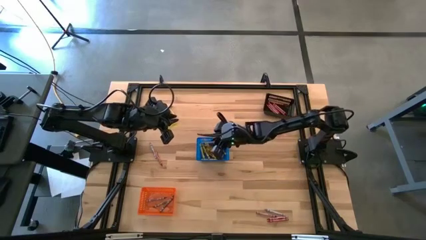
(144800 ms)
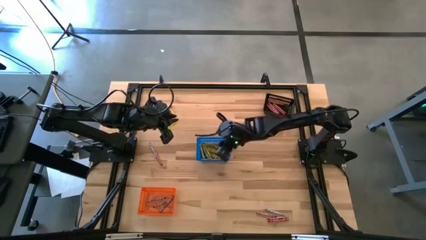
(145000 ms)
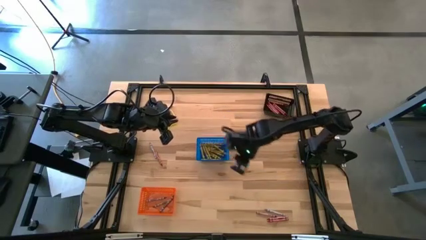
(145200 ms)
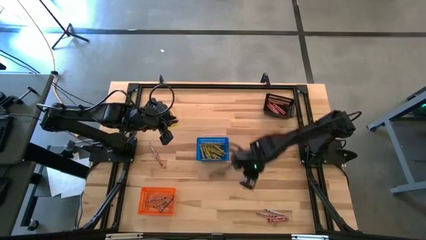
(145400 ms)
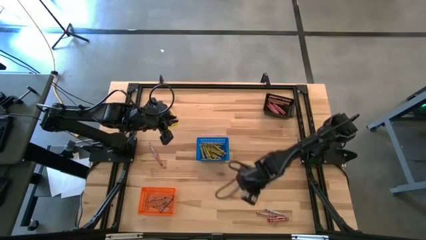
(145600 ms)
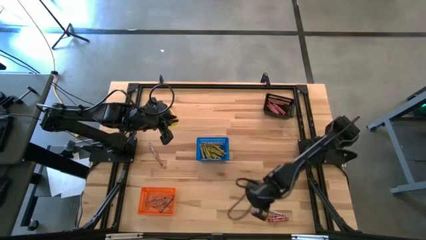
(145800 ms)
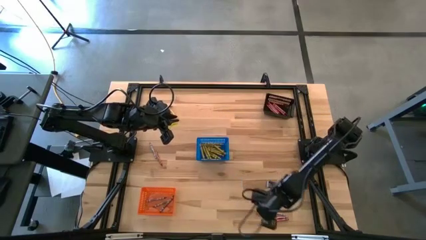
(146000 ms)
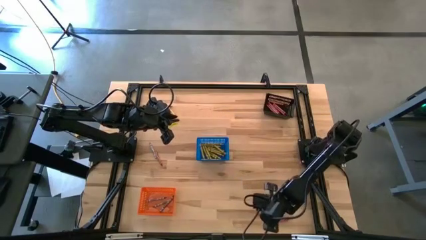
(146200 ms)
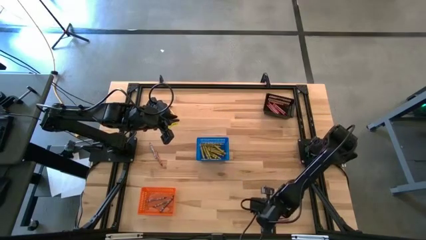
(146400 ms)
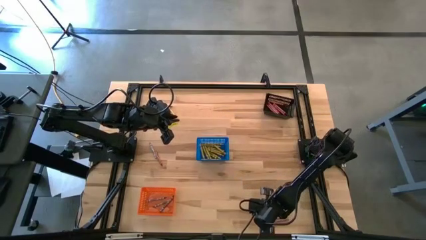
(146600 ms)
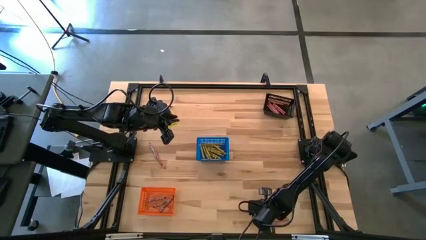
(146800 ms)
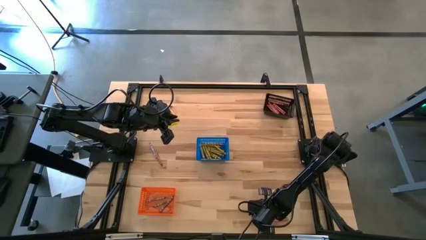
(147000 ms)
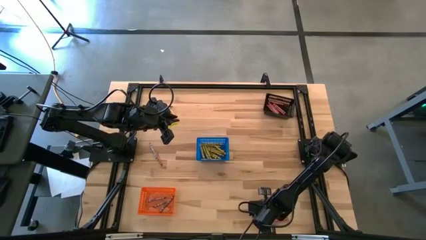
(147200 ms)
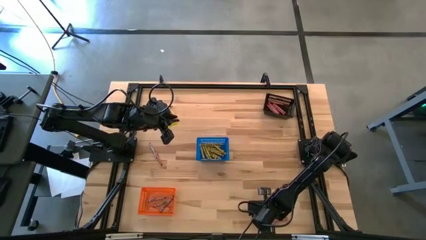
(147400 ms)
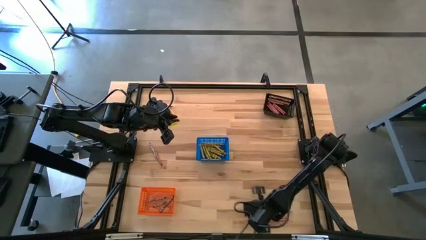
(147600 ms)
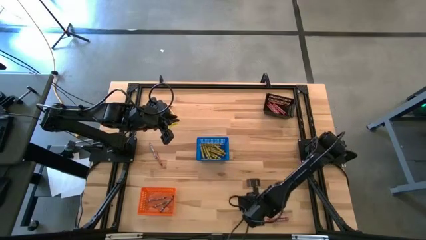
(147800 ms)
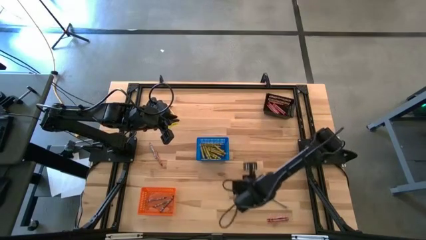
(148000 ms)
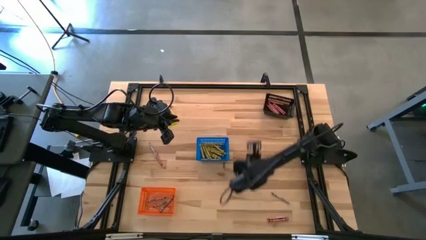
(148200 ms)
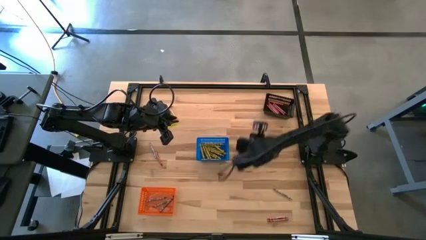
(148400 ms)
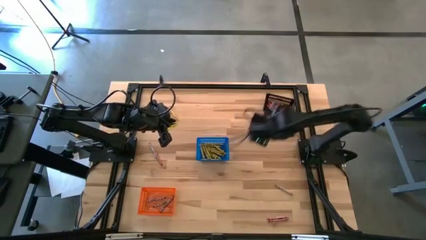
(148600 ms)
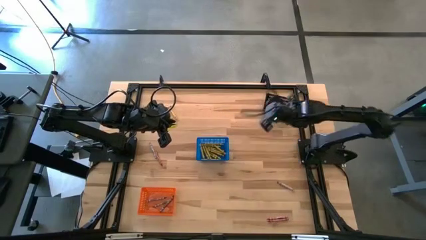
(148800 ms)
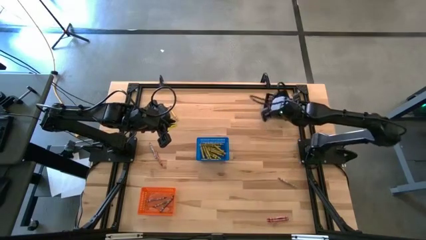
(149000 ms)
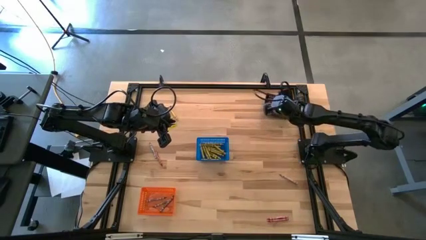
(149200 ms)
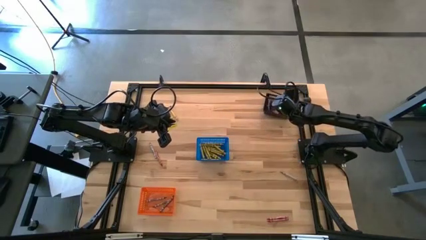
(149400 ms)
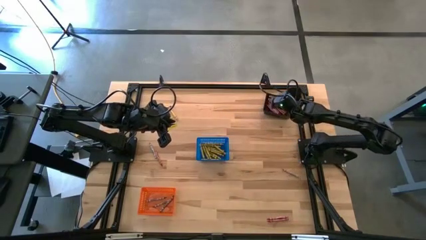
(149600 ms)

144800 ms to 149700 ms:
Task: Sort crayons
Put the red crayon into the black basket

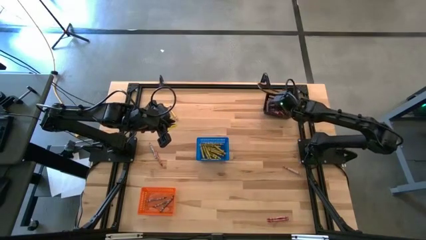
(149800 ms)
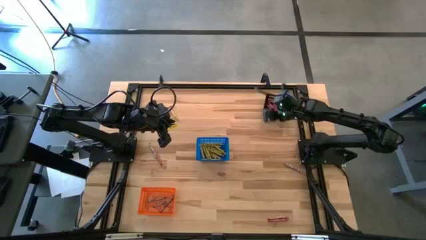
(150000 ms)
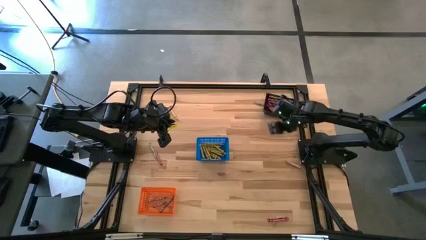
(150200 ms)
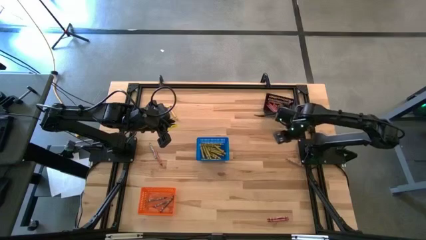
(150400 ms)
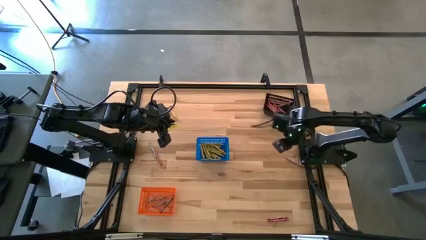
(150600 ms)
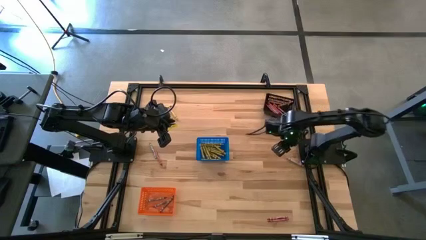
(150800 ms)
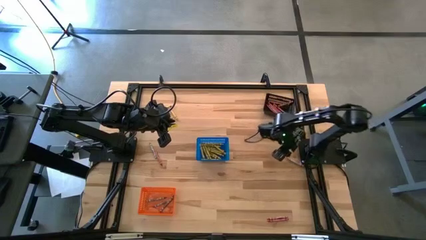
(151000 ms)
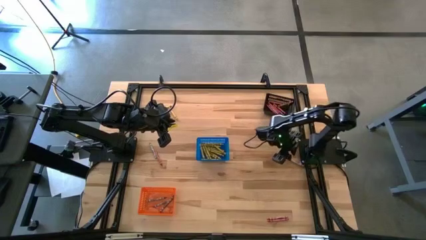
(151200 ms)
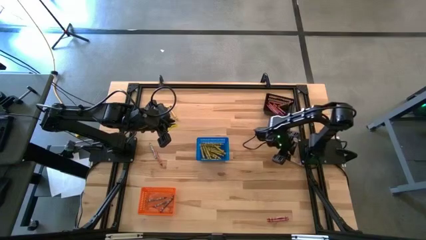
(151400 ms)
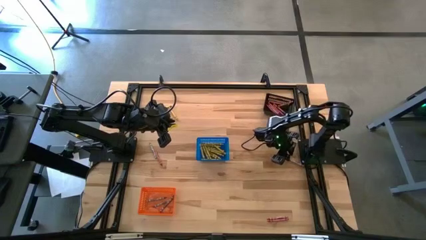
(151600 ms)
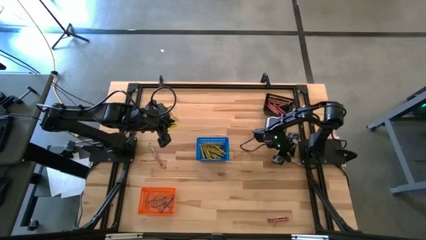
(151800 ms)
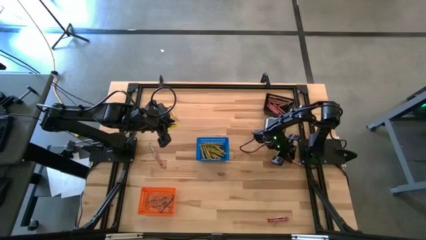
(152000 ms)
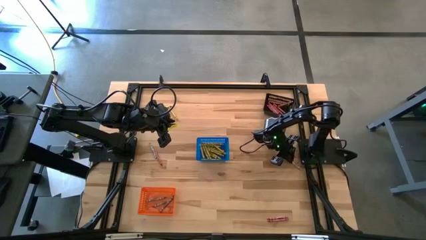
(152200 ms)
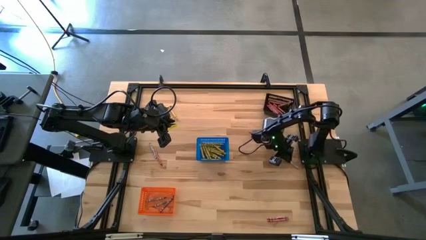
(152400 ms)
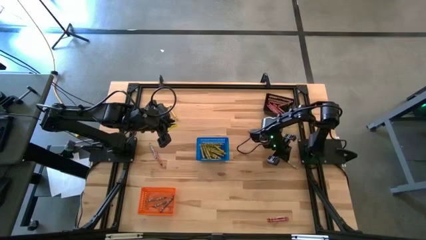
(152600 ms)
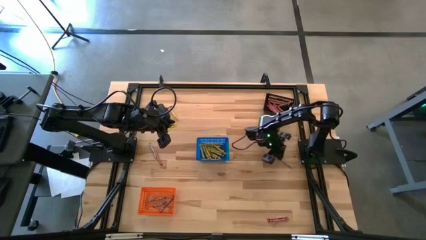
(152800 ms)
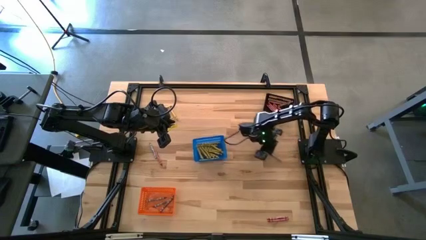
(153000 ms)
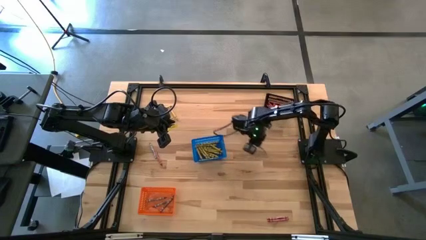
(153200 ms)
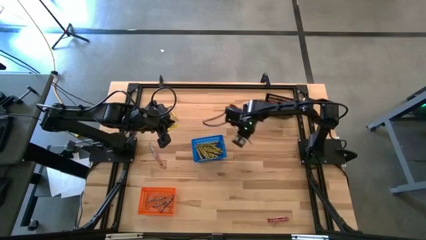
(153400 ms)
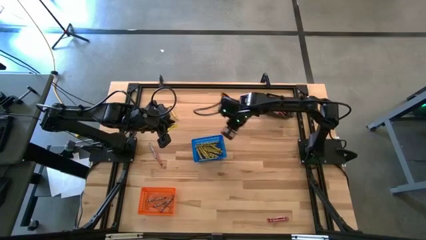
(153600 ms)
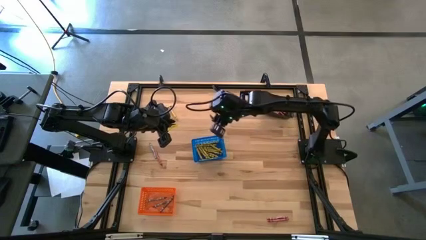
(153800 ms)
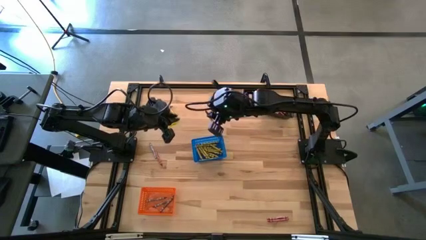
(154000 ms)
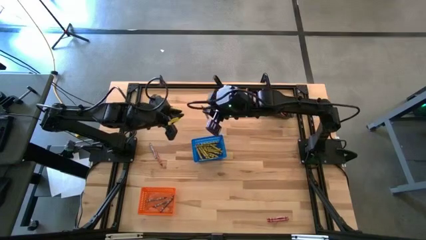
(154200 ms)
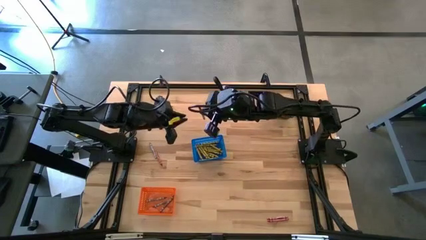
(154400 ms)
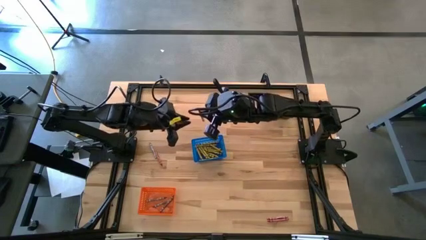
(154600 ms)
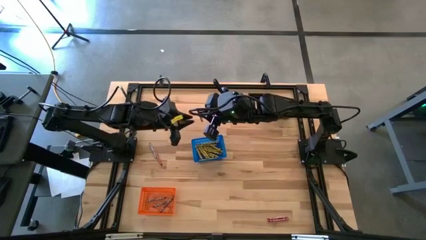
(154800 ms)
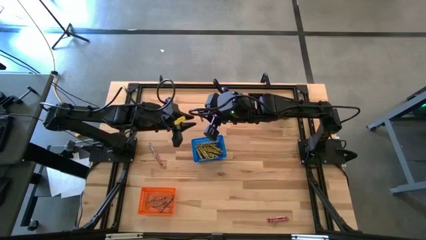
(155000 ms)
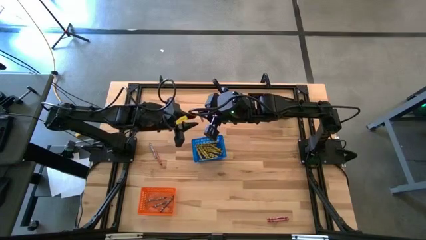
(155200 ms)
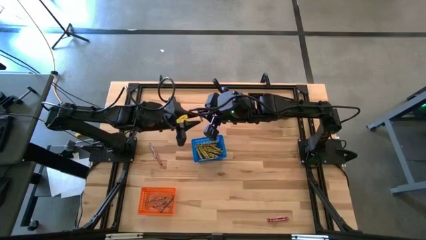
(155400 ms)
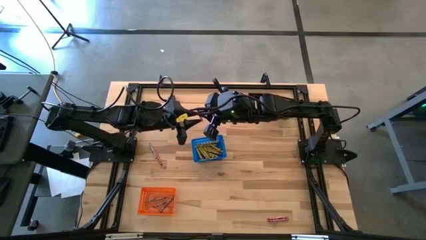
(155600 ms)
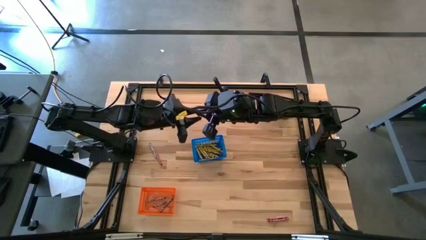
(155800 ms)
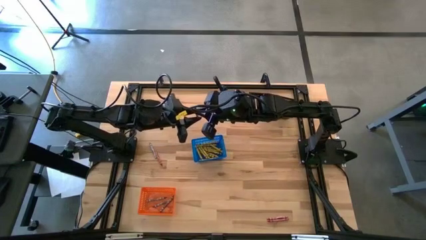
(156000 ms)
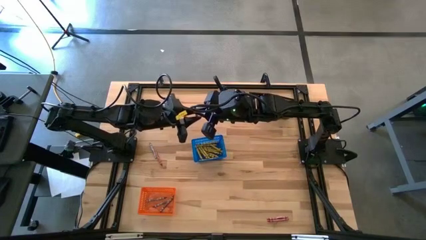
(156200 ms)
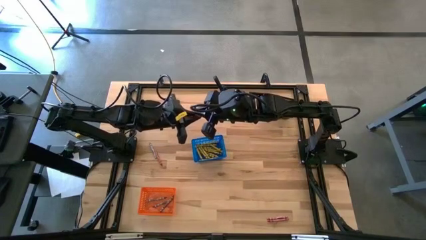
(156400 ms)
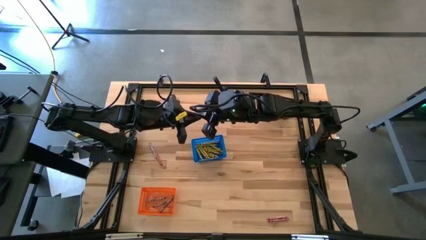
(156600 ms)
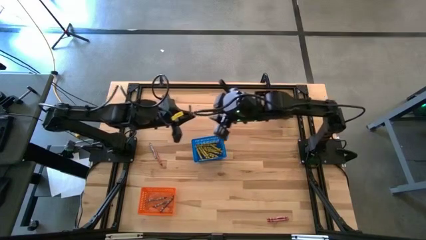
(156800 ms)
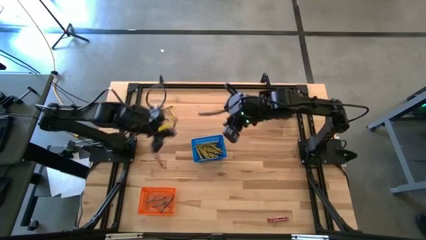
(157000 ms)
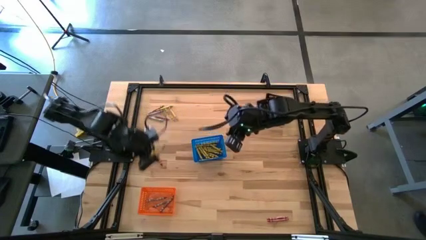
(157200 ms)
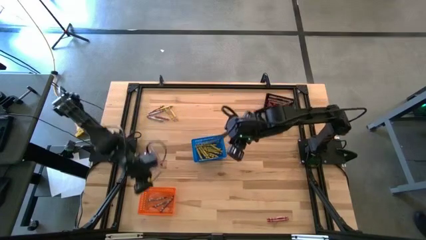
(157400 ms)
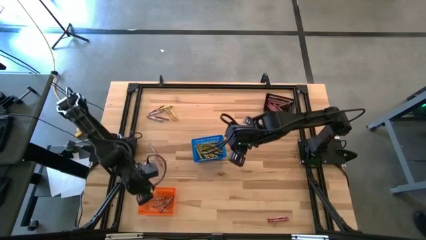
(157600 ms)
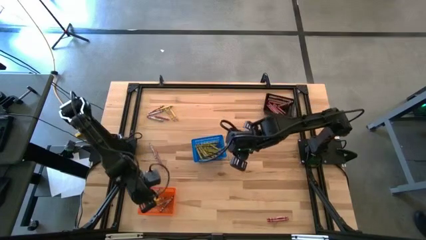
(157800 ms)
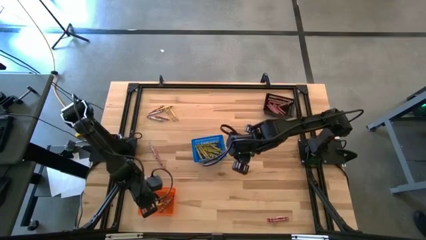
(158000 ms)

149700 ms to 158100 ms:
Put the gray crayon into the orange basket

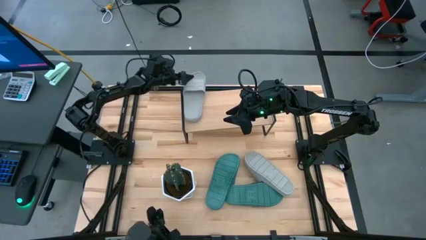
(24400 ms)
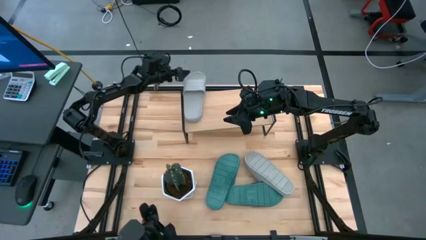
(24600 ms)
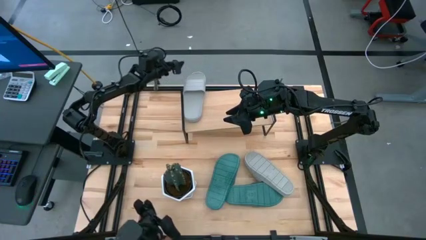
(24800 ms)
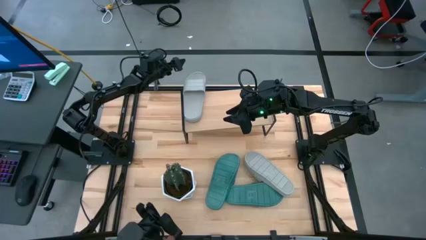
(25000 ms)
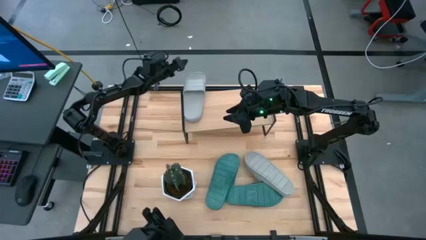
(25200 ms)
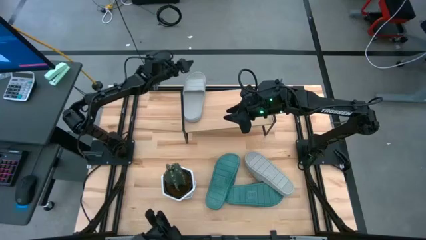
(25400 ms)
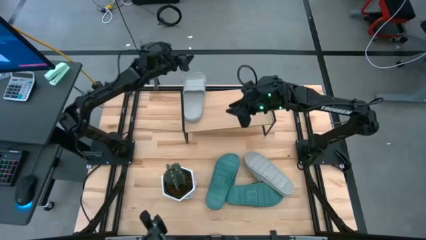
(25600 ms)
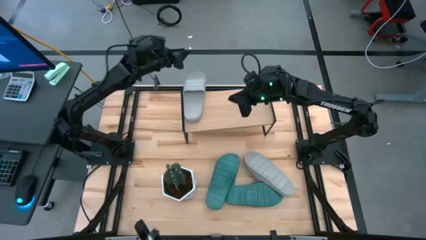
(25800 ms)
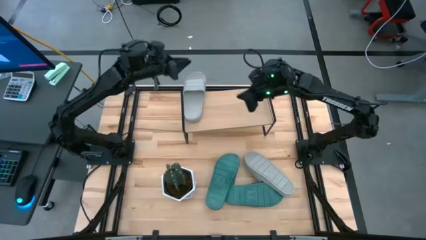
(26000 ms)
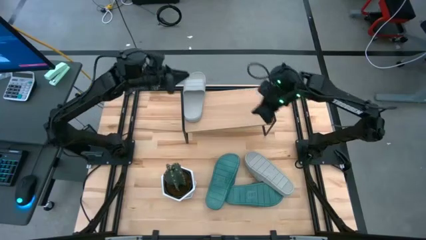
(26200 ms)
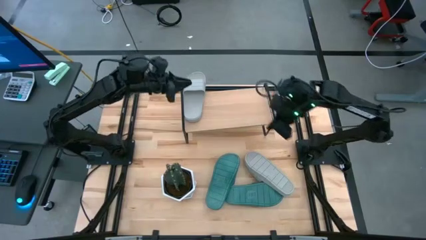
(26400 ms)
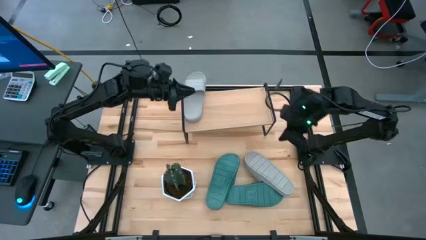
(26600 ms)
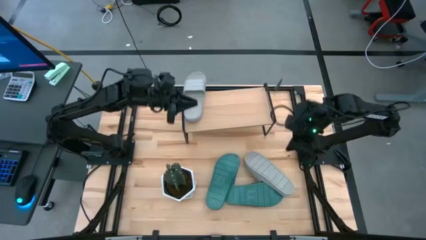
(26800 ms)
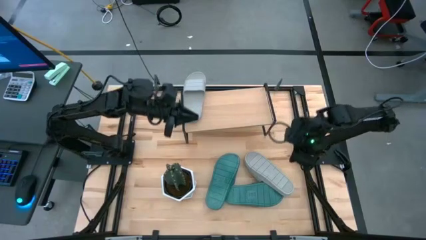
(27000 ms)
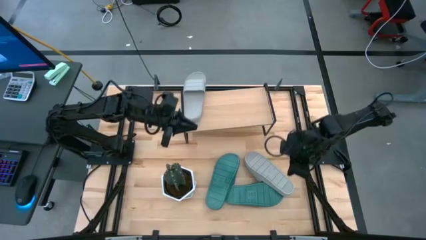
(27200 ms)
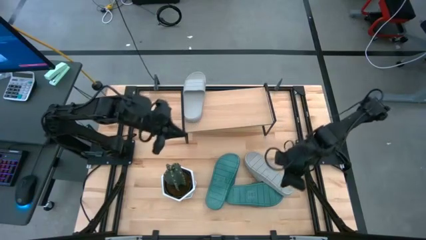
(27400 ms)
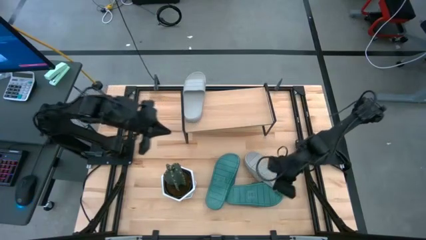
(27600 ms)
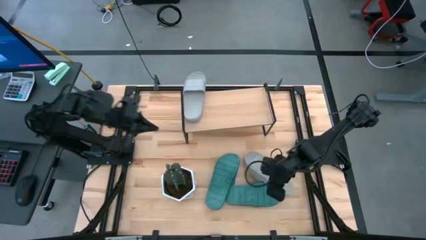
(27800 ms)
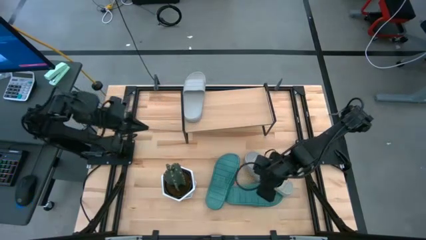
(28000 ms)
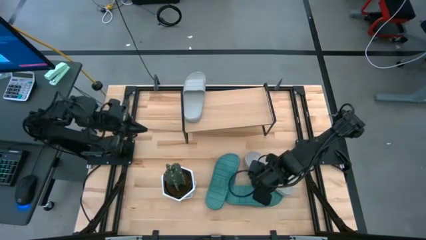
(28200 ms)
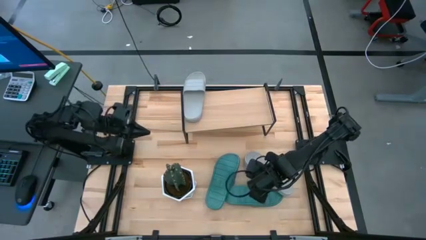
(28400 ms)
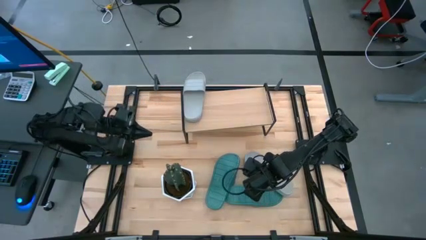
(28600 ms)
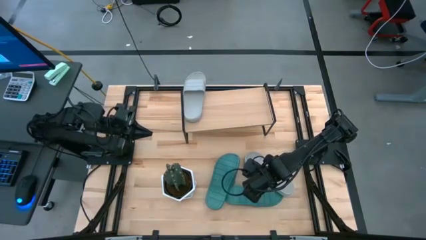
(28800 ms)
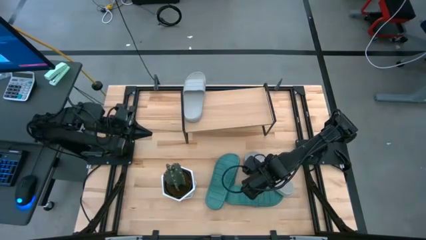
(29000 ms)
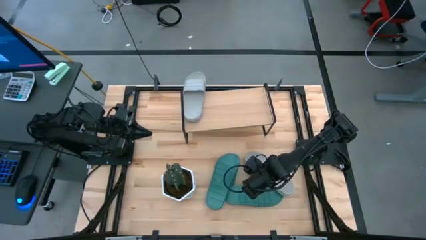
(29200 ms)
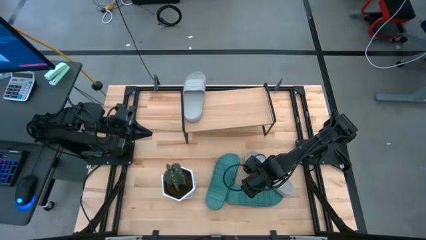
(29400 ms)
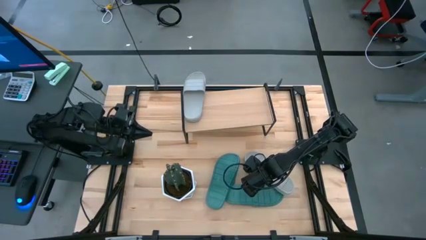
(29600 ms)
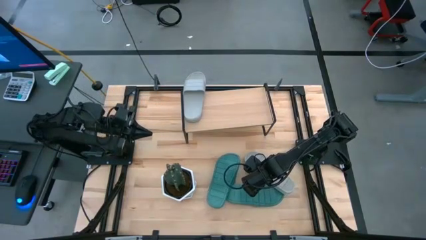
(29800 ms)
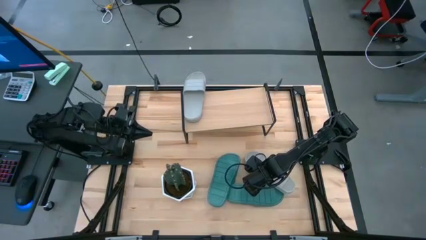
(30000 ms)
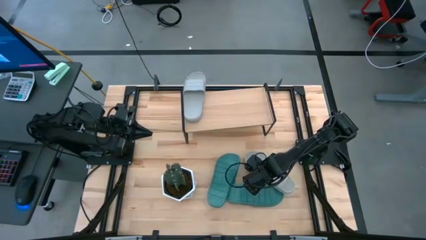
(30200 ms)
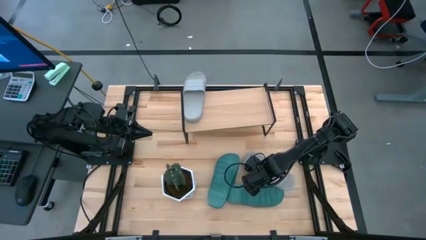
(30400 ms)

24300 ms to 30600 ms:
Task: Pick and place slides into the shelf
Put the gray slides on the shelf
